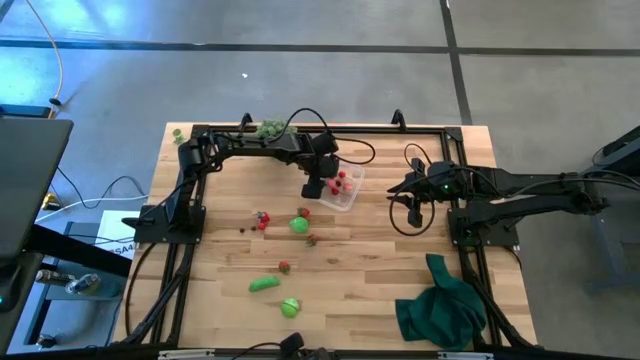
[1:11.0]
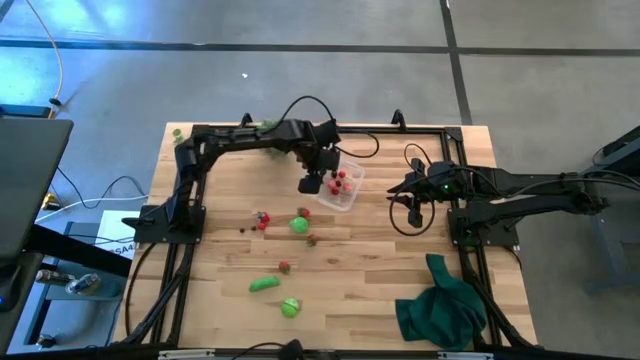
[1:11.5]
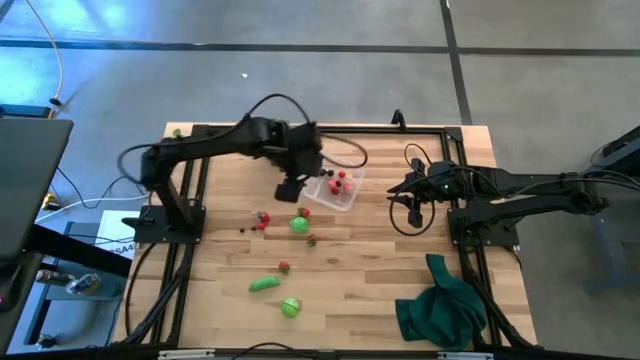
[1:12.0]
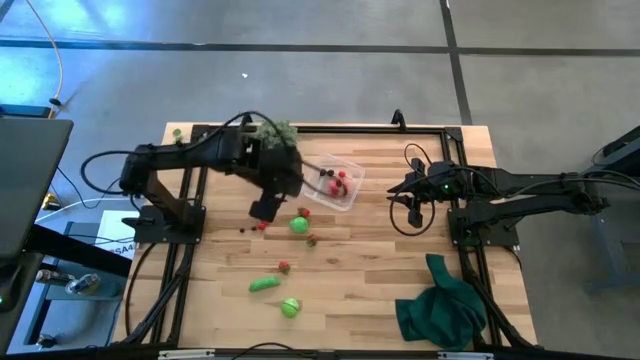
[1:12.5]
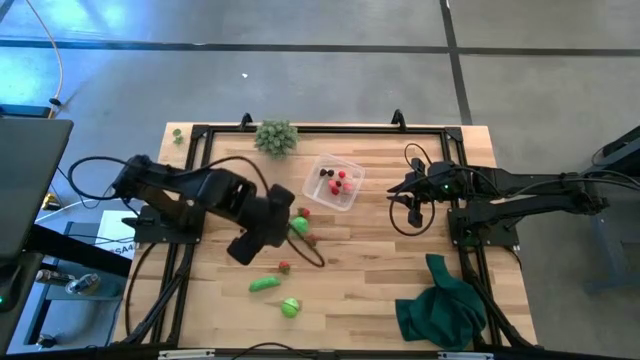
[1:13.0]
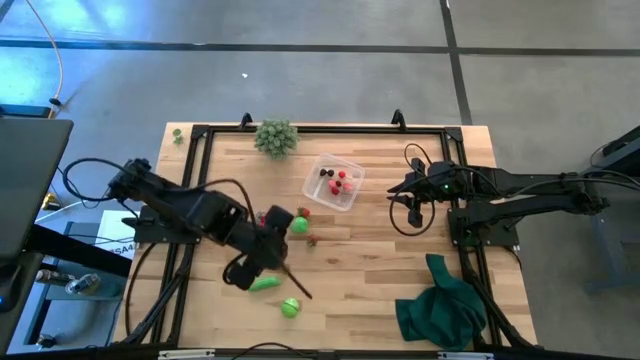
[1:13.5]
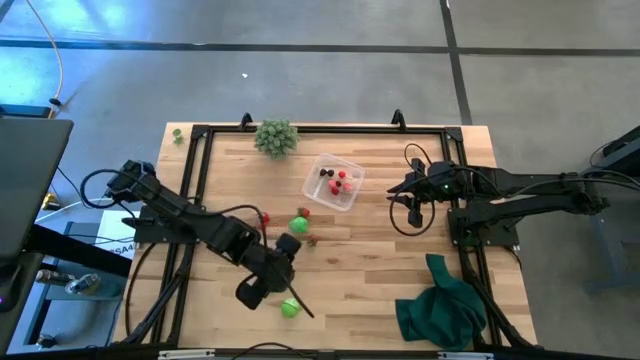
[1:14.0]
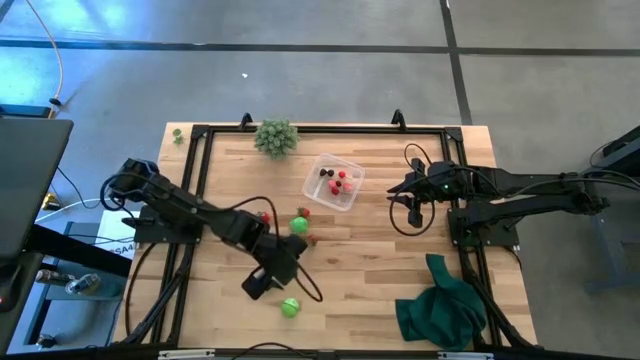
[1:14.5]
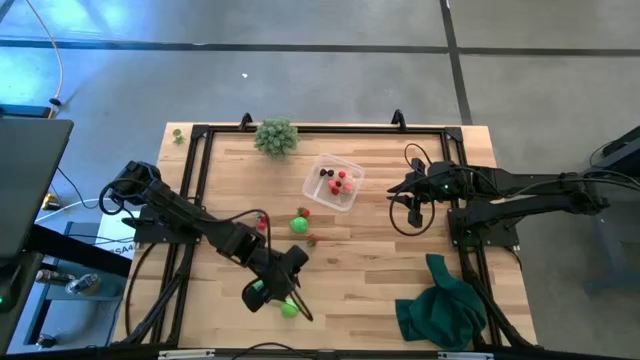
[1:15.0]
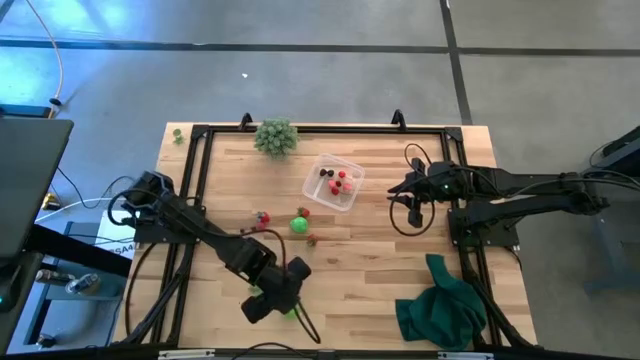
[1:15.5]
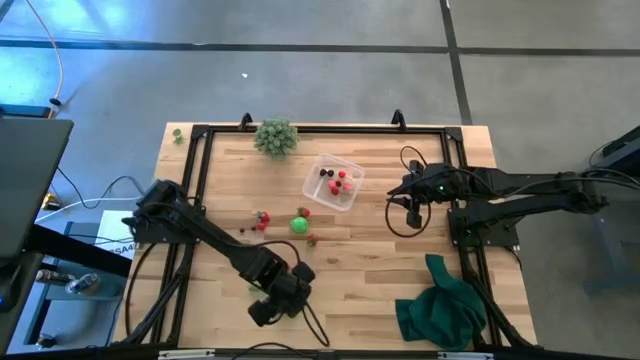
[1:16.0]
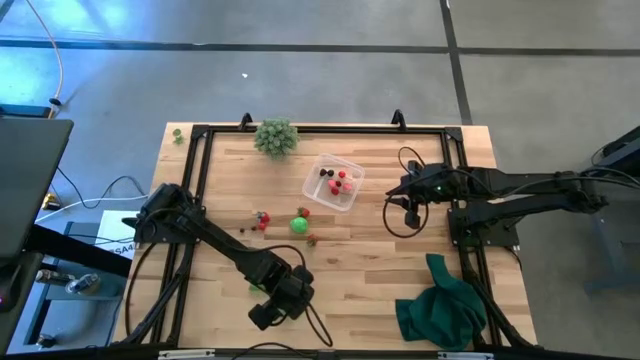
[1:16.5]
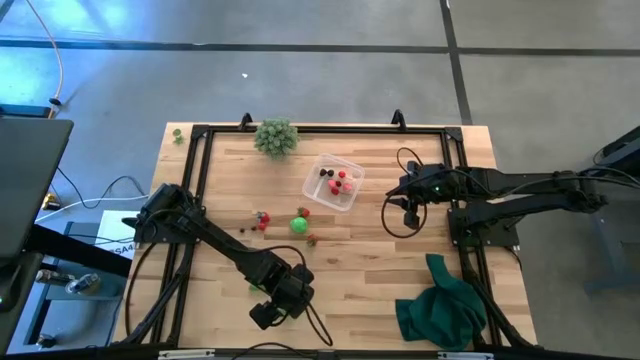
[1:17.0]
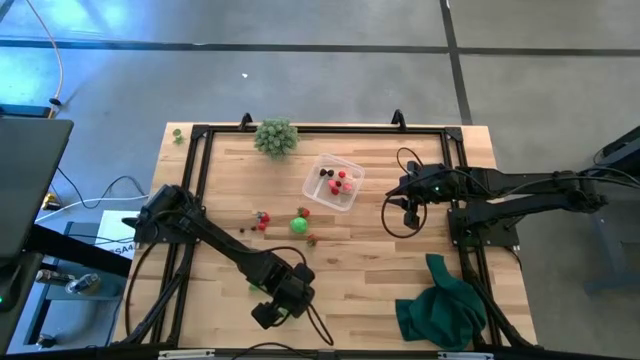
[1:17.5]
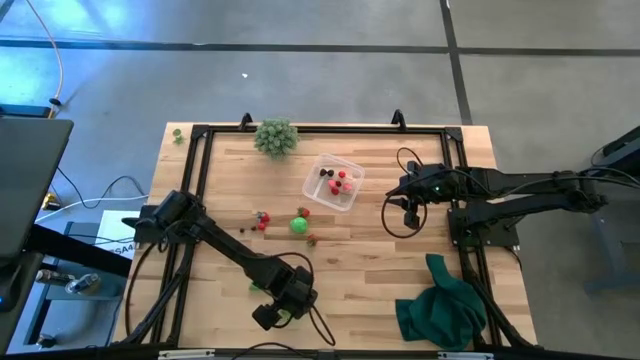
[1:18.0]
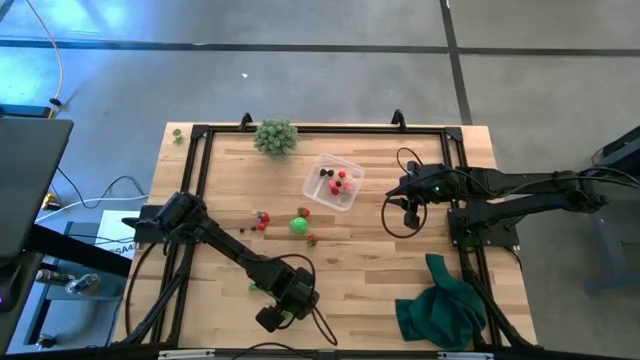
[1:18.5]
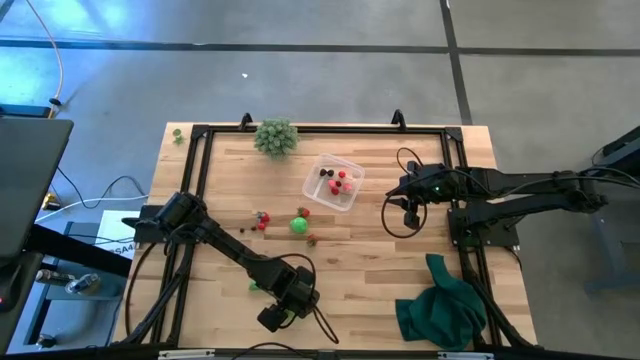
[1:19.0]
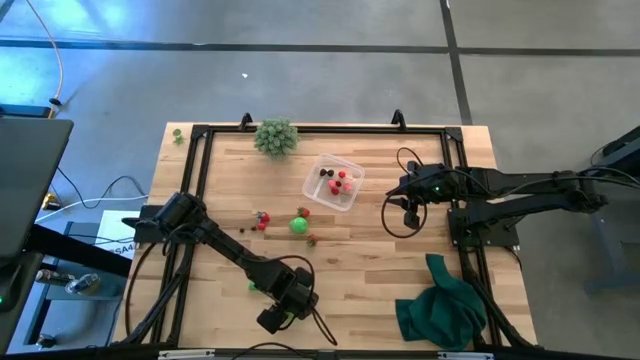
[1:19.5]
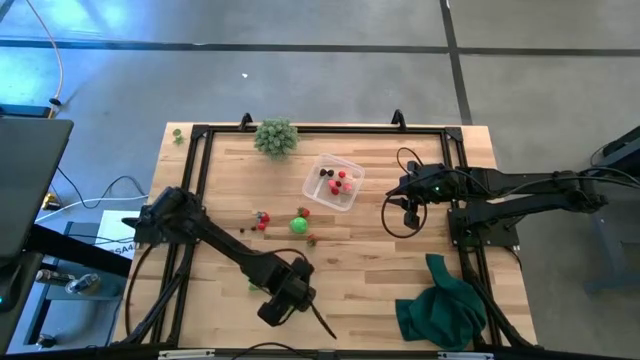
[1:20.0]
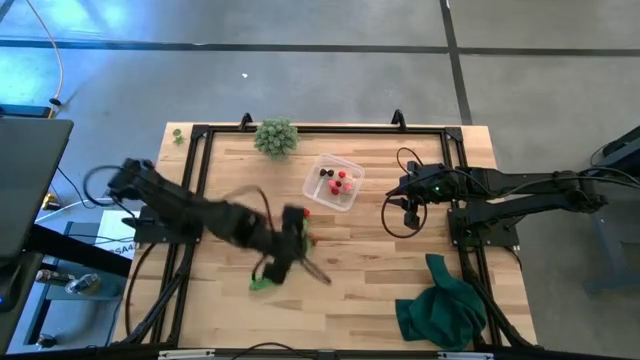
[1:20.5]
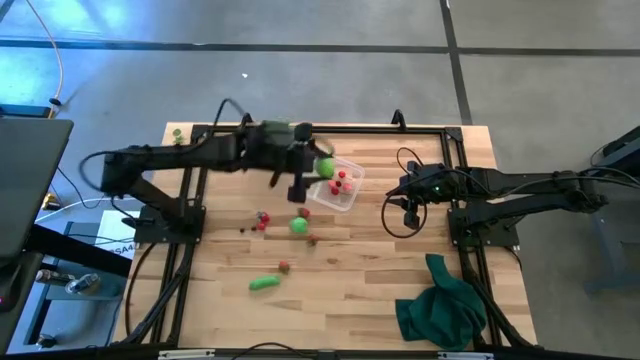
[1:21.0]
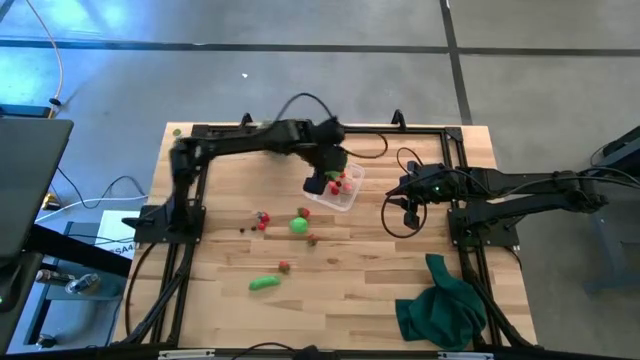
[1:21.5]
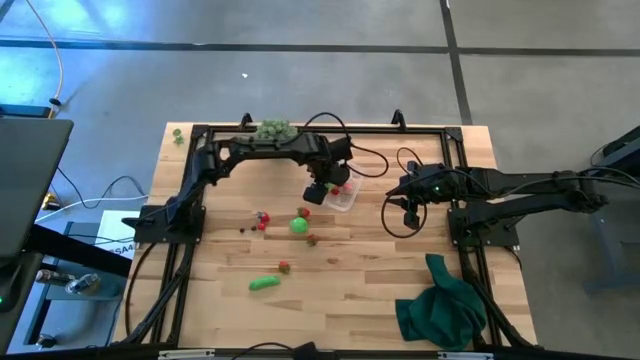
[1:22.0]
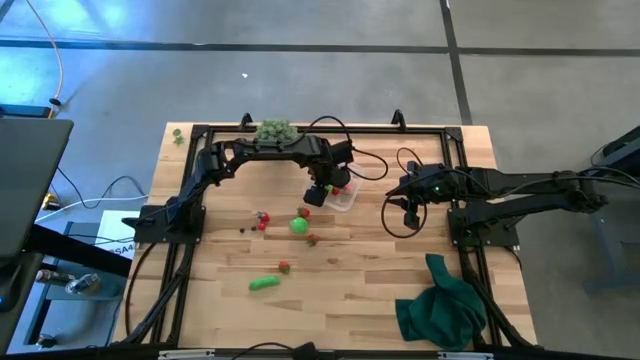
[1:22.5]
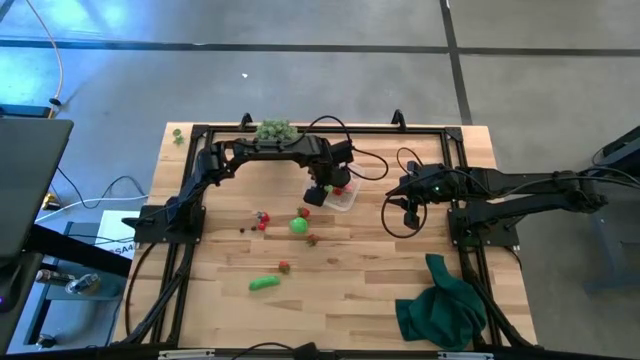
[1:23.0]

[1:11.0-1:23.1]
Task: Pick and placing Produce into tupperware
Put the cabbage into the transparent container

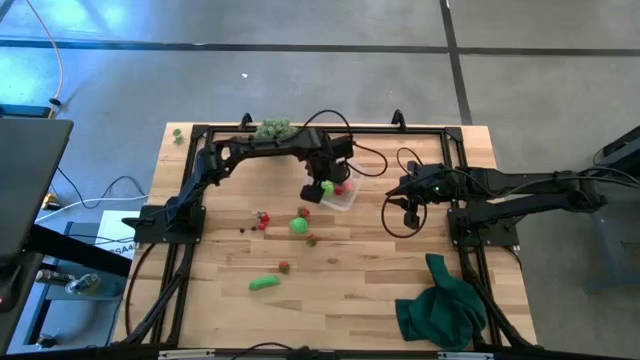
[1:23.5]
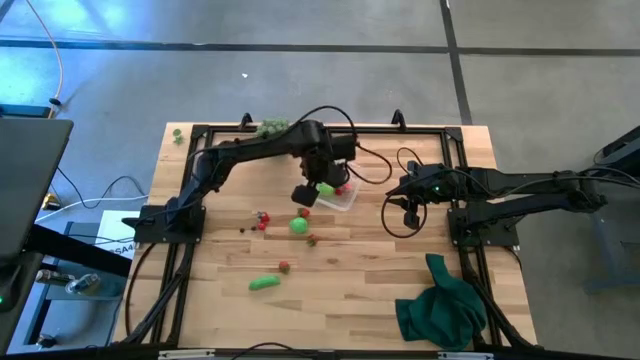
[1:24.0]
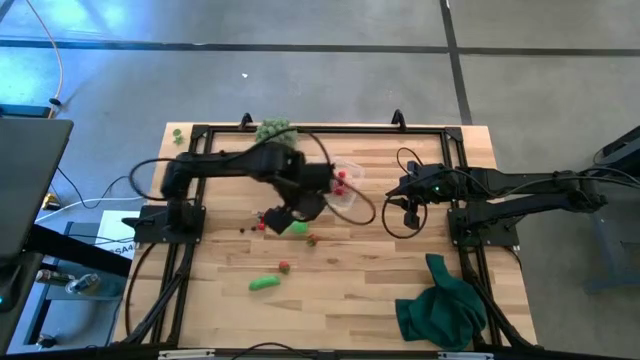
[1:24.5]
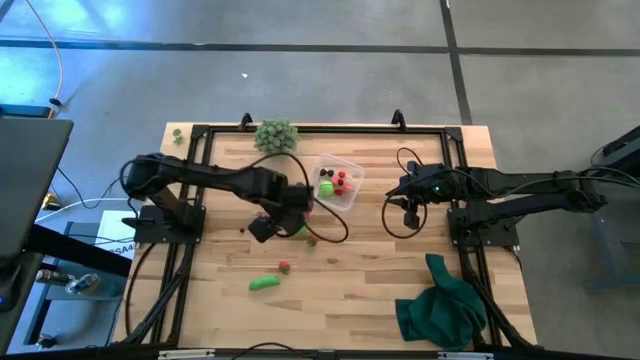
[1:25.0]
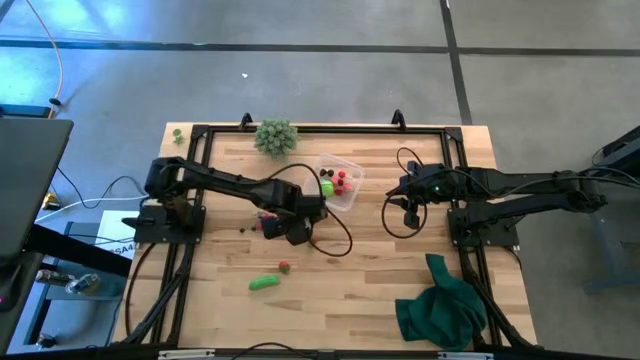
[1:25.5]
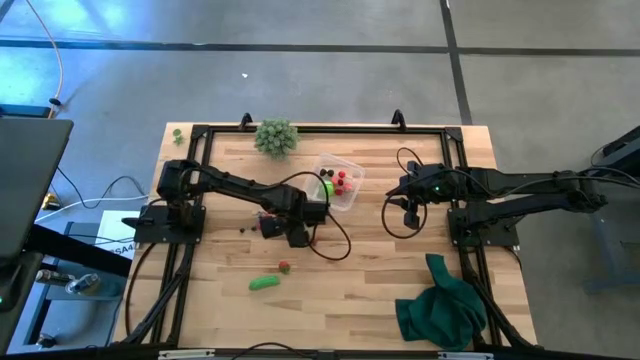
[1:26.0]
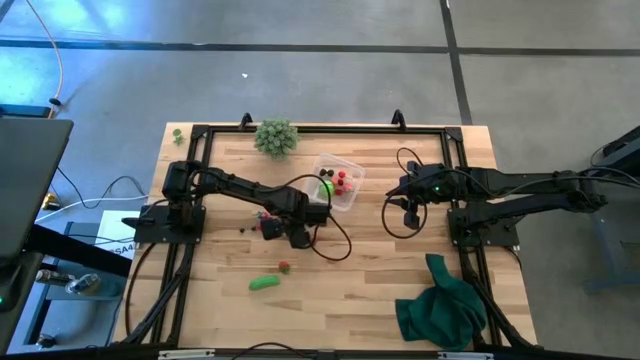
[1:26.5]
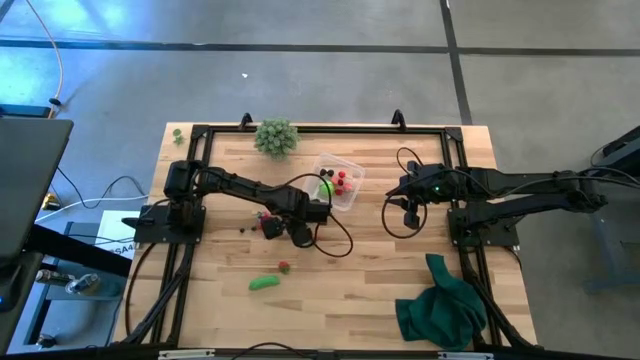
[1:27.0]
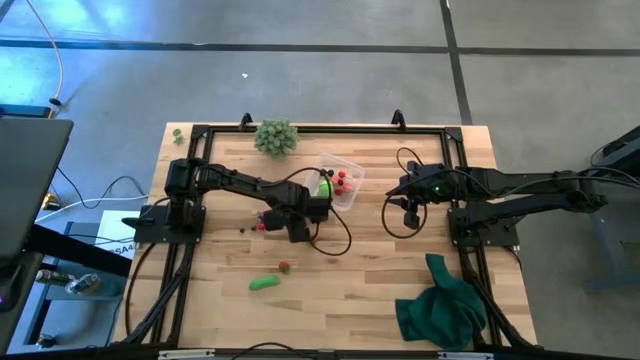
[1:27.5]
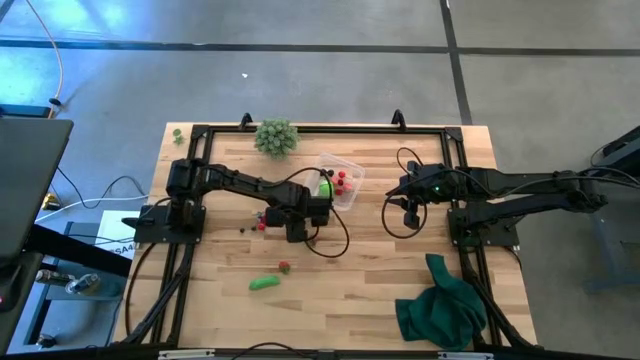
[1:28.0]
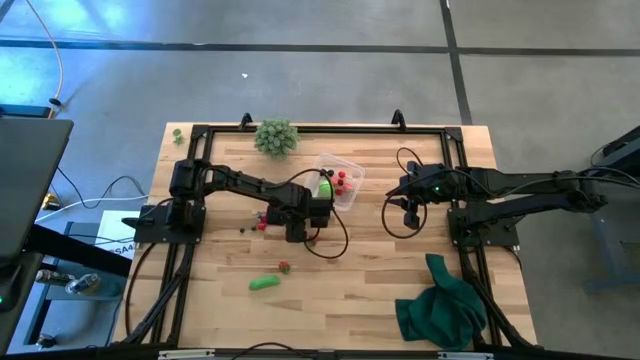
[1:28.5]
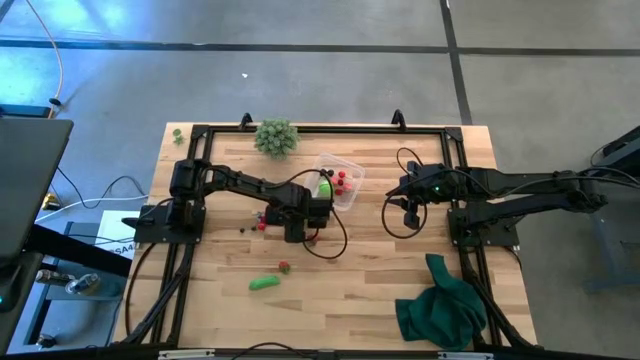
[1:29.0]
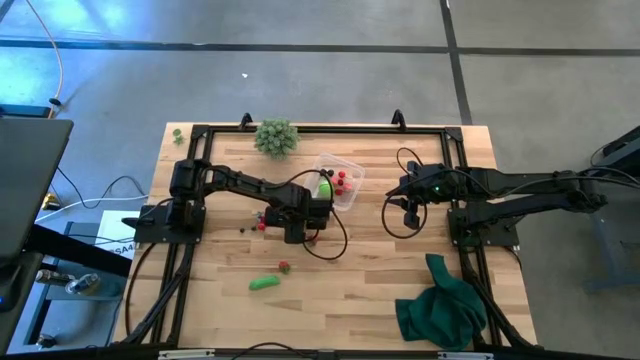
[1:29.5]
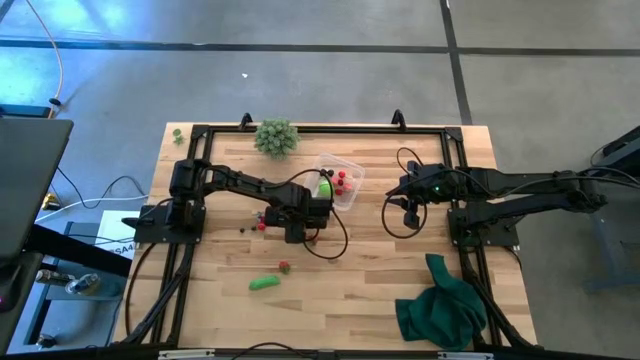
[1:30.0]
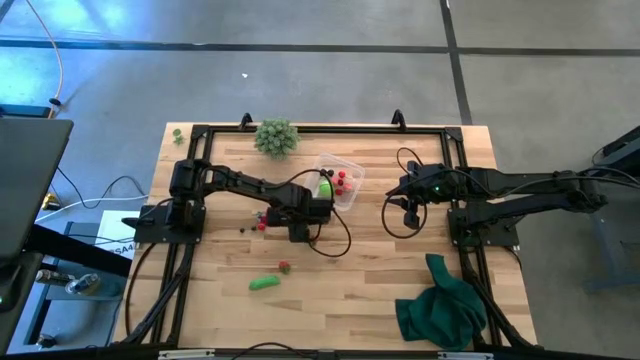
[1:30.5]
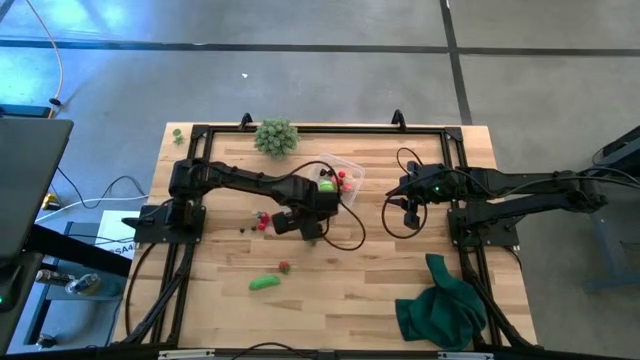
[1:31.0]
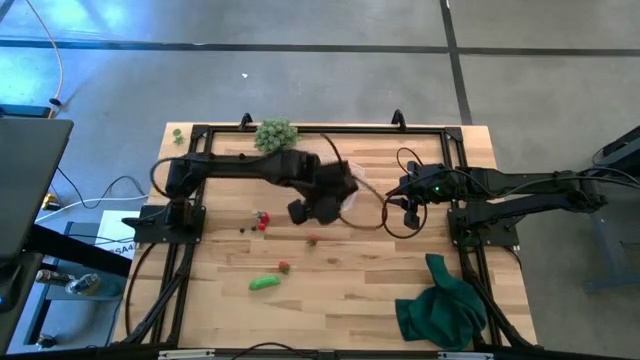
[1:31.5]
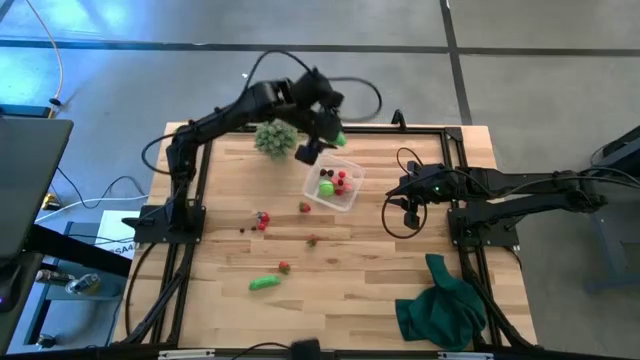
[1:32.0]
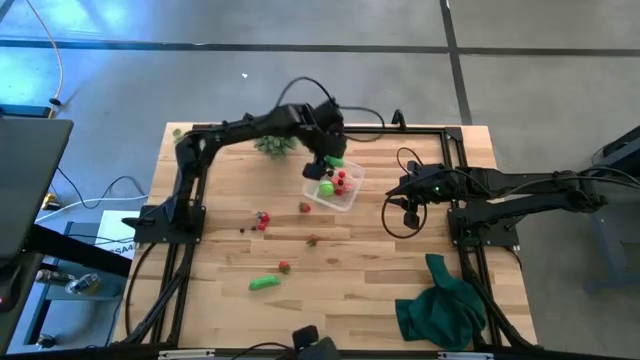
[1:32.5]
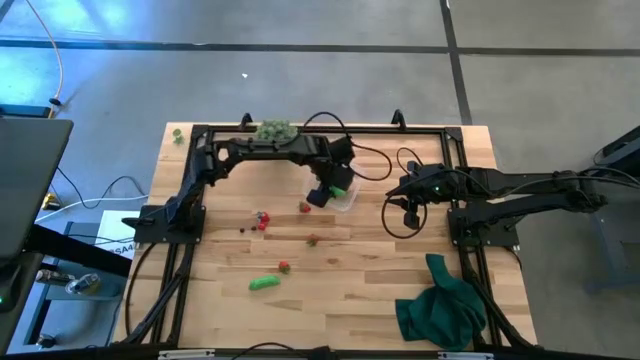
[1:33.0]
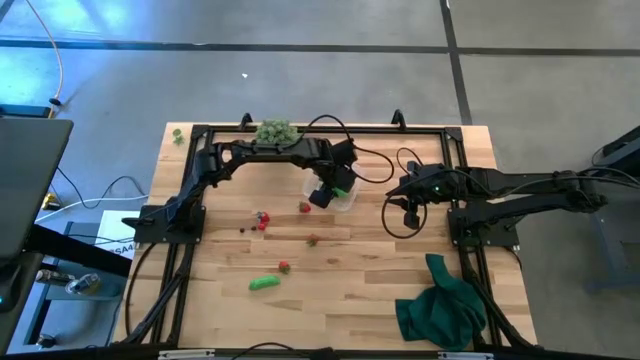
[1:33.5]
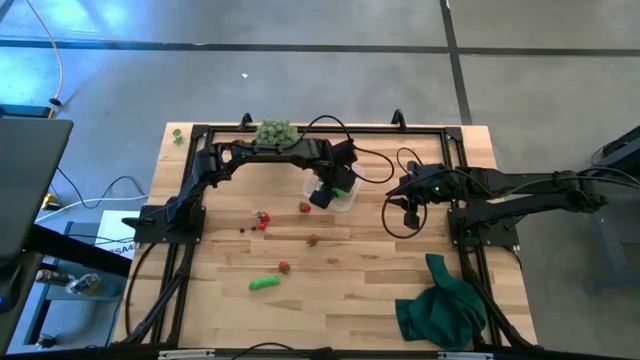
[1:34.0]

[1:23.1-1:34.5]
Put the pear into the transparent container
